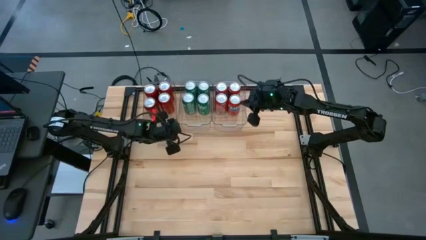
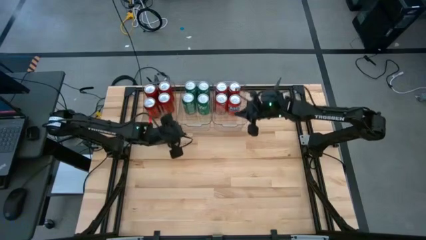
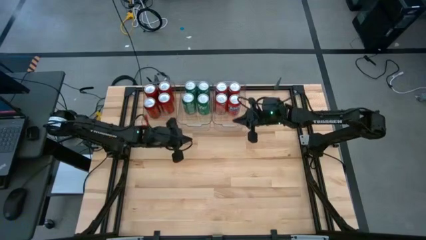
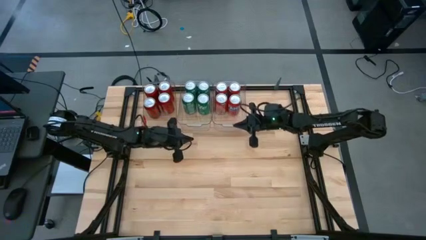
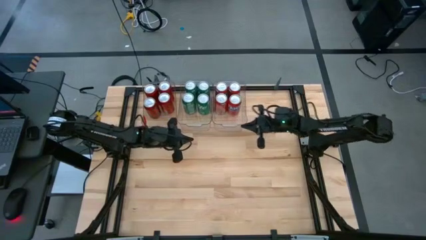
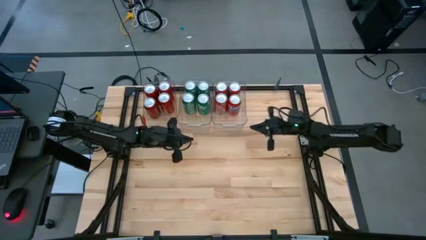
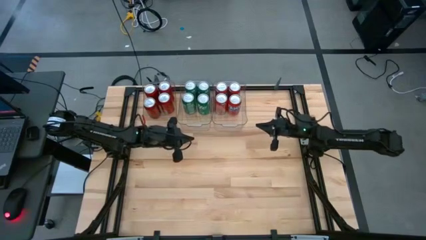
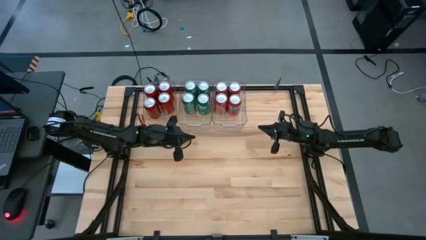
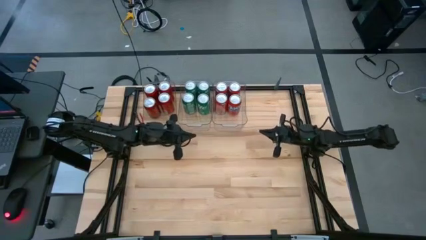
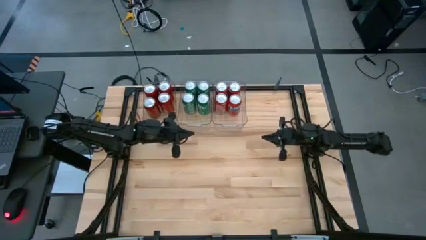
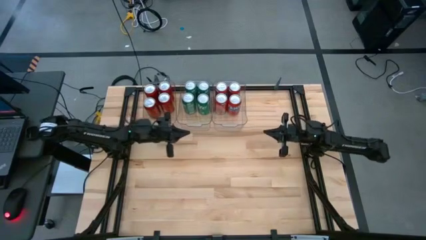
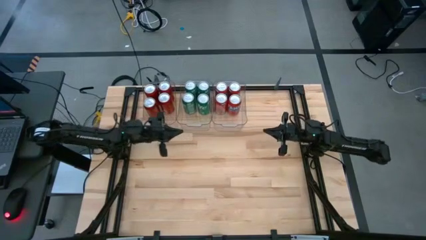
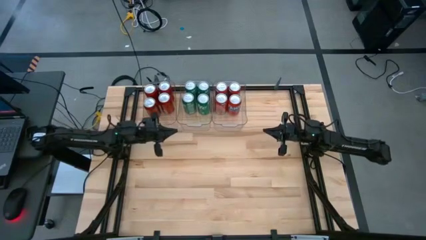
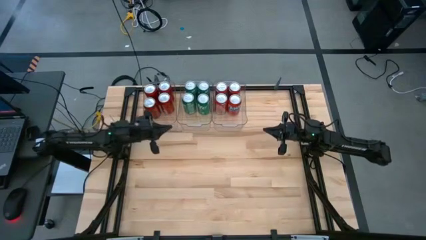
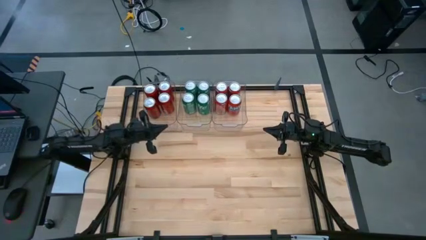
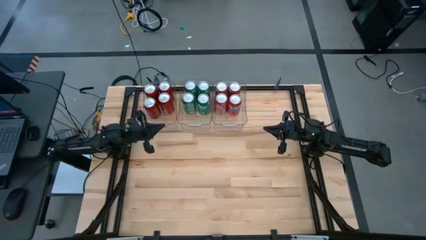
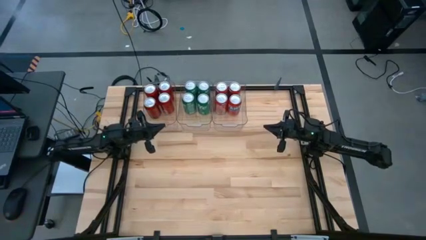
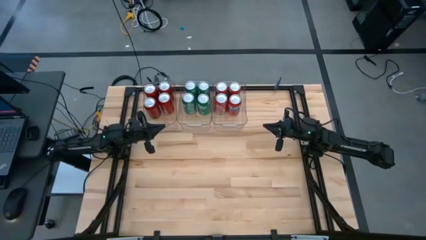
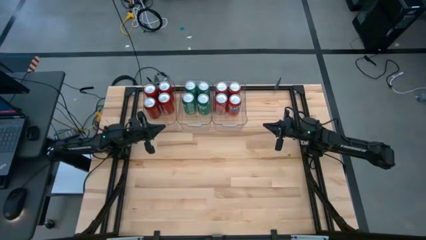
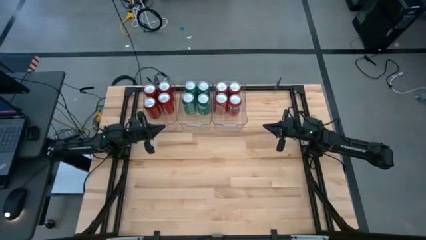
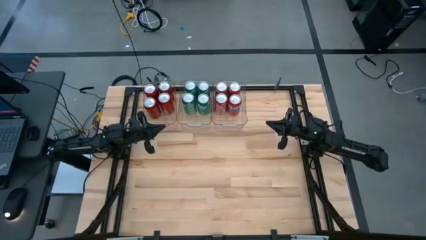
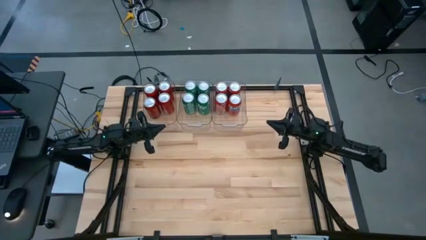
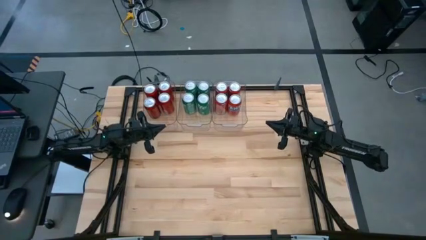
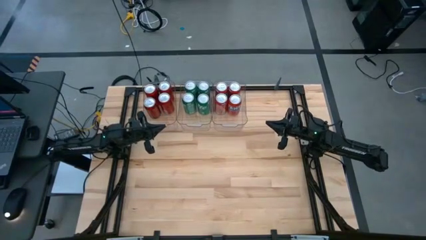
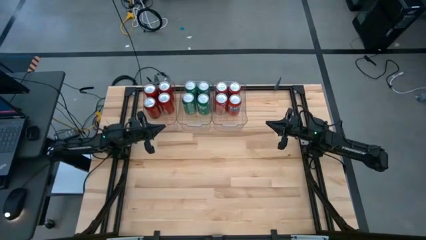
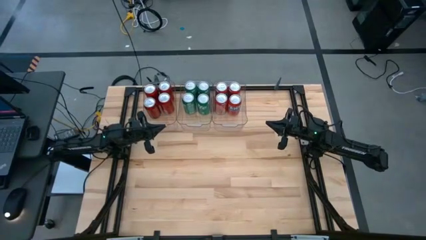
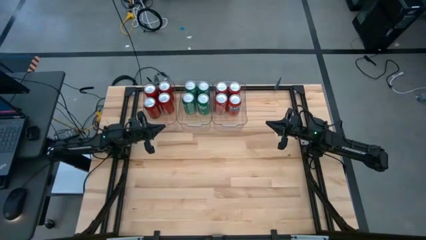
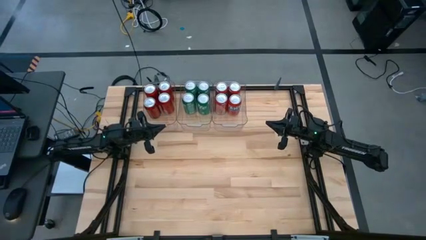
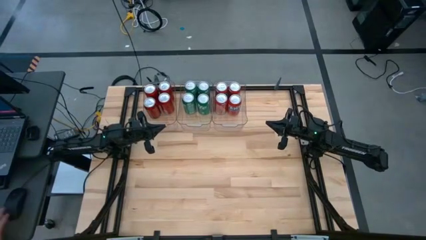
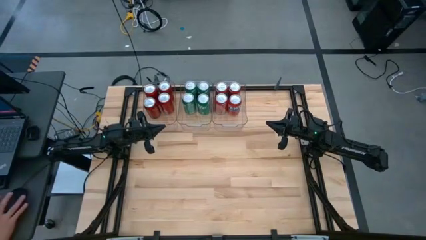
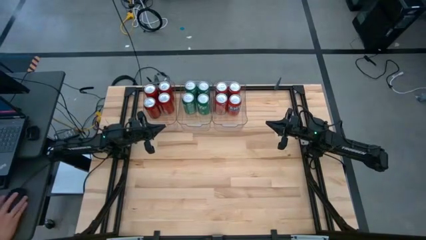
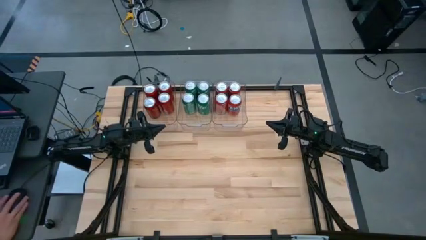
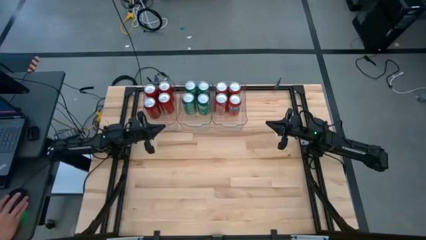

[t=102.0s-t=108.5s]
Task: Sort soda cans
Return to Home Position

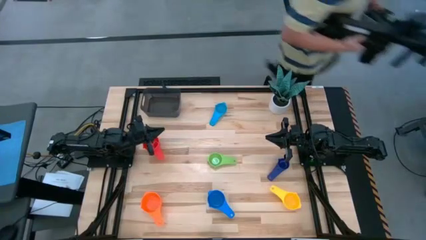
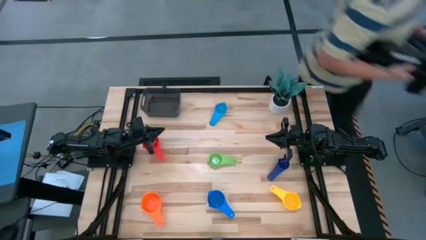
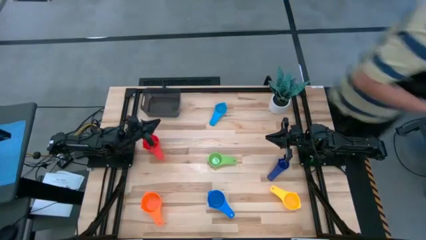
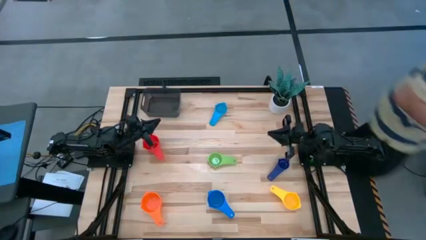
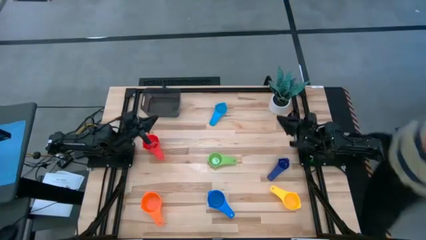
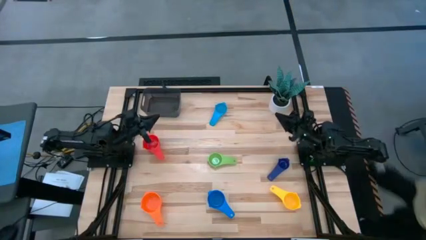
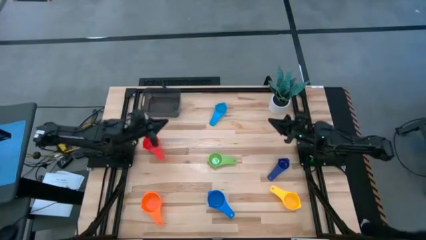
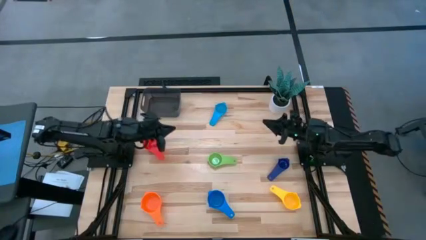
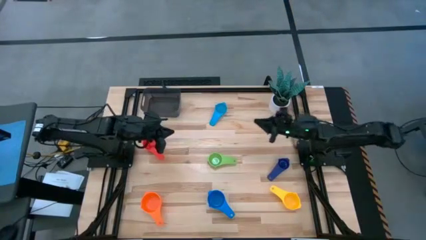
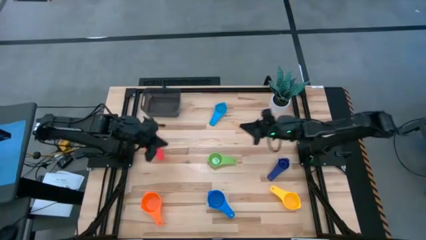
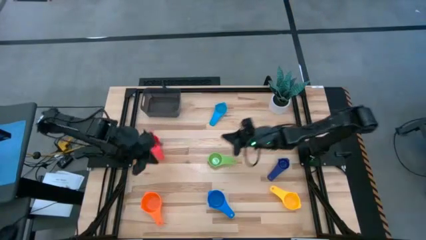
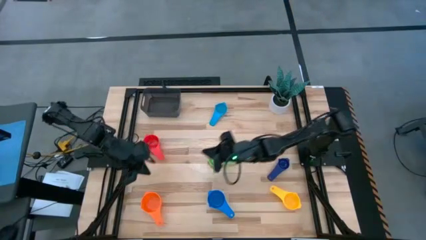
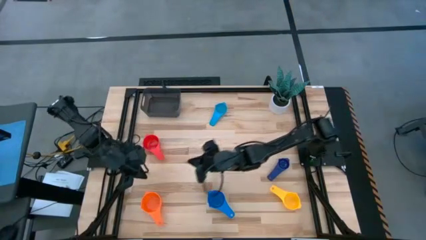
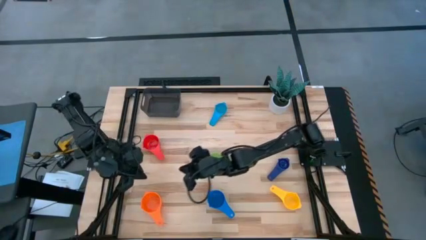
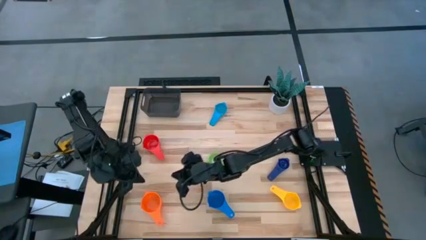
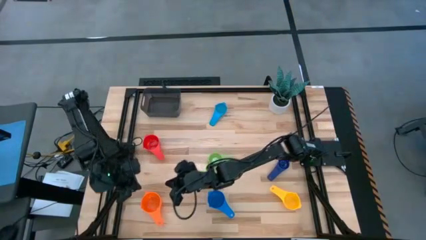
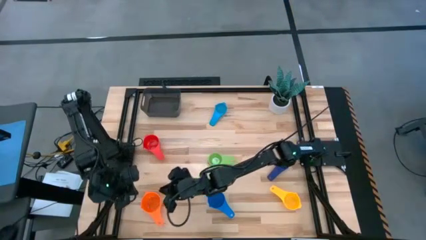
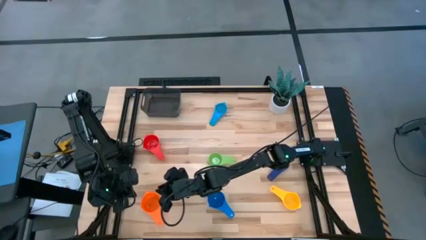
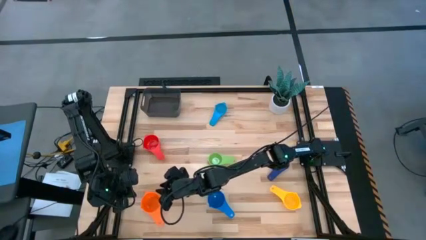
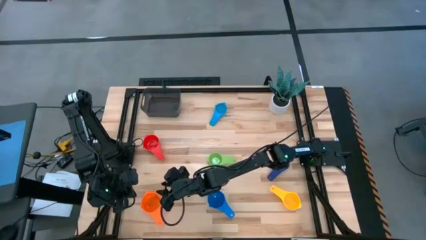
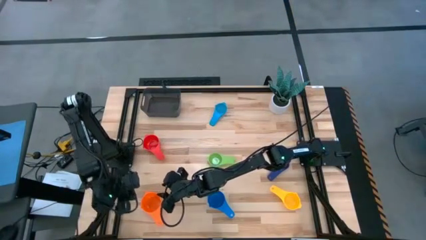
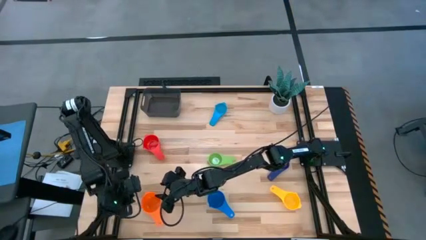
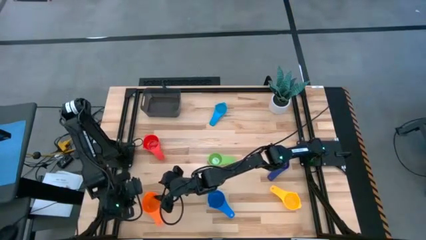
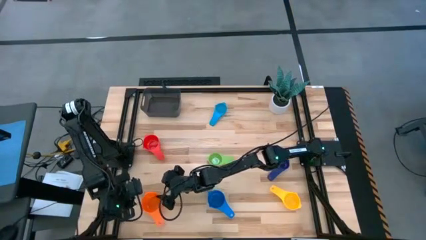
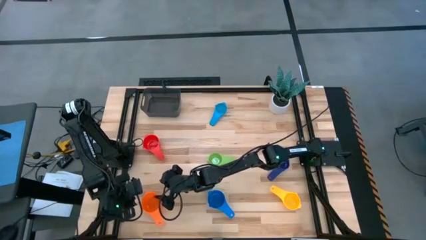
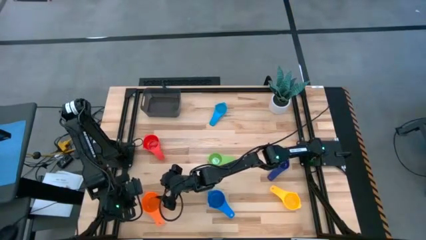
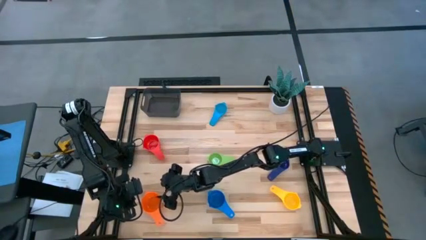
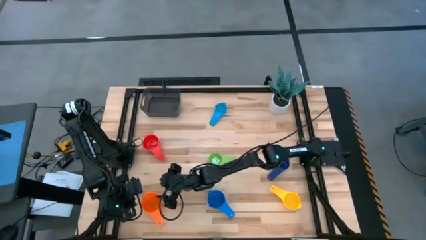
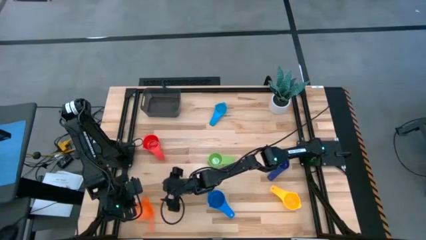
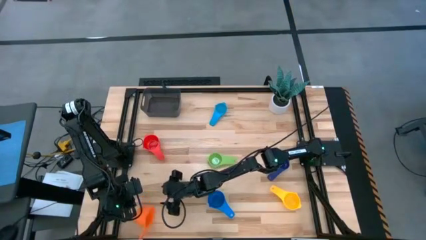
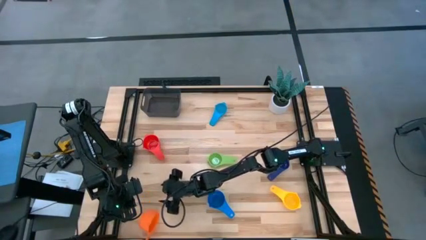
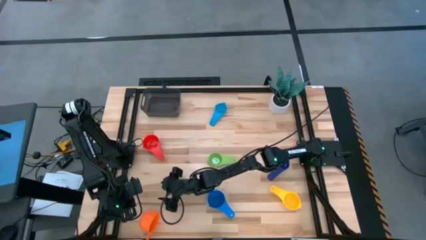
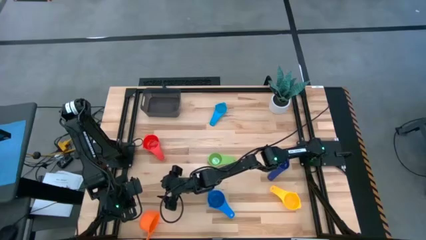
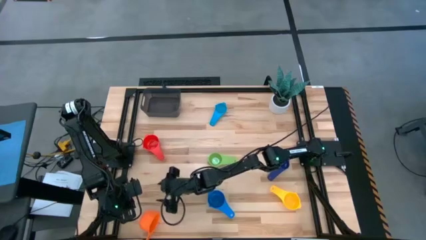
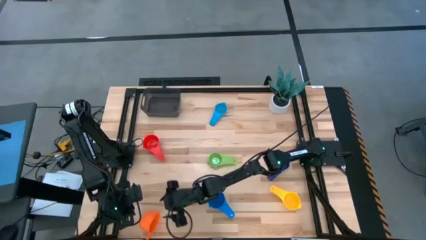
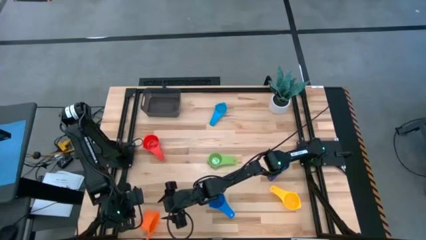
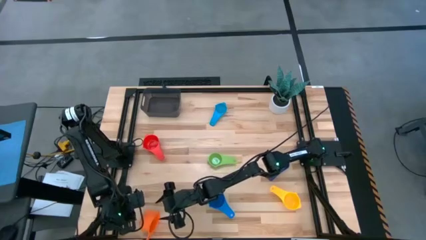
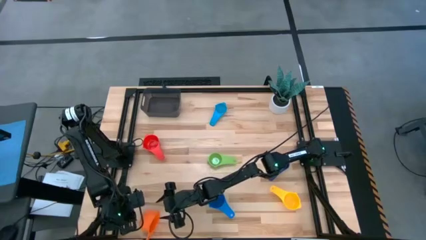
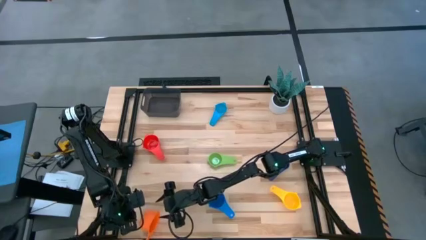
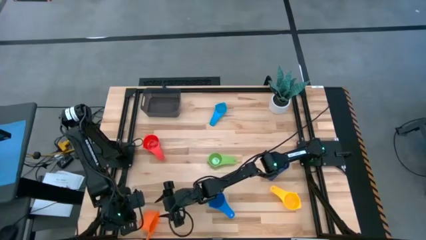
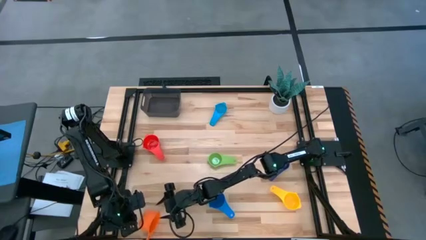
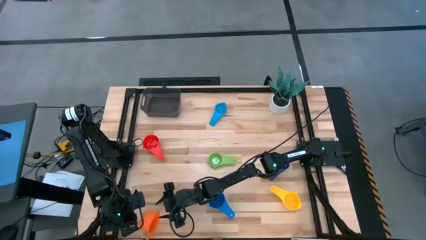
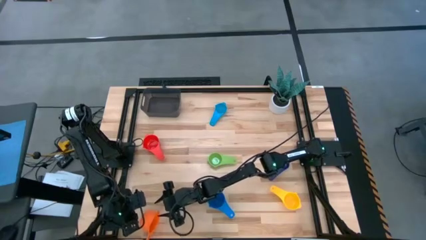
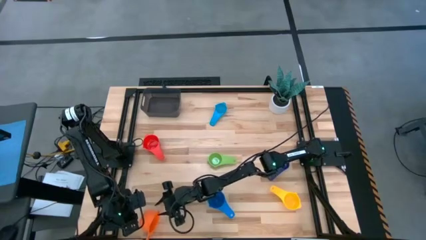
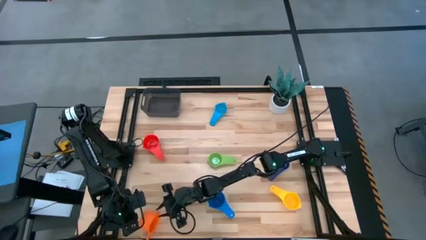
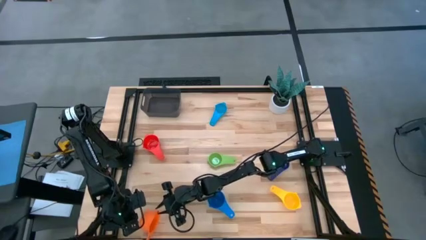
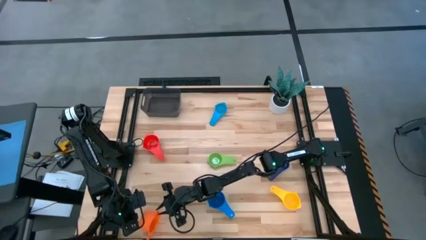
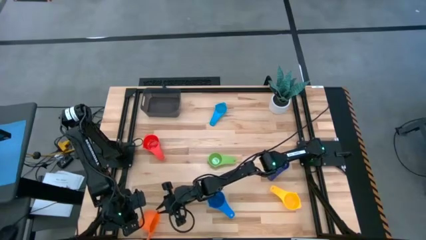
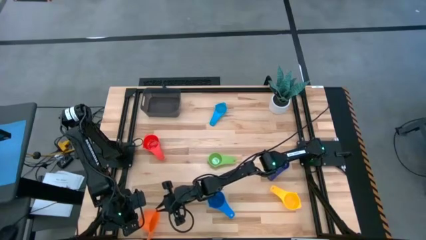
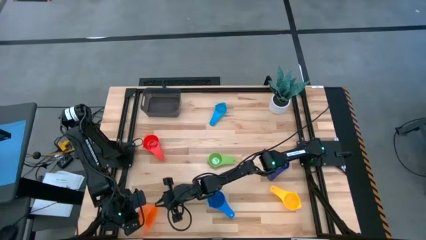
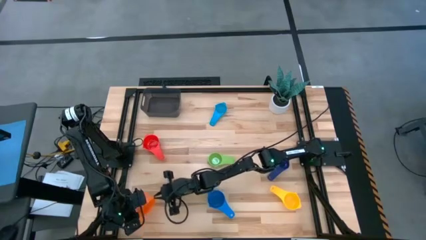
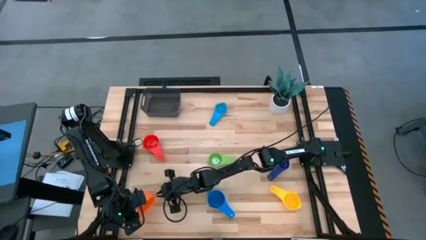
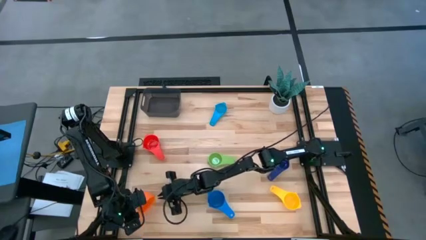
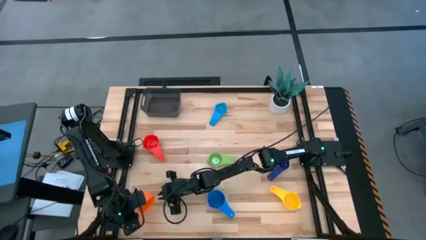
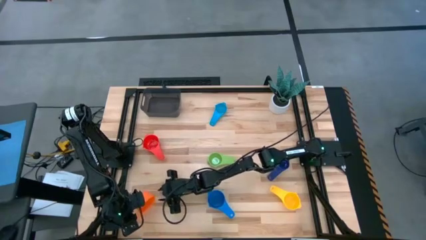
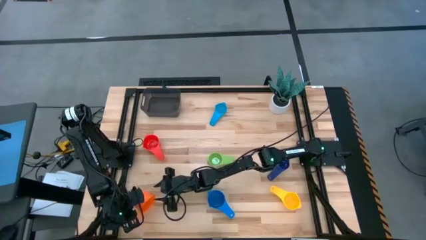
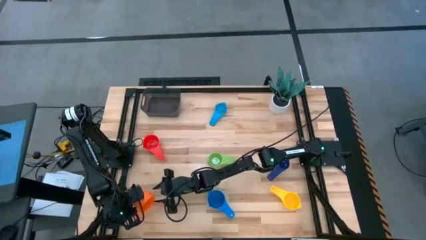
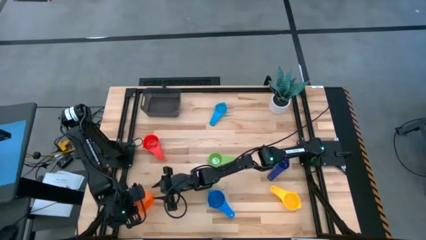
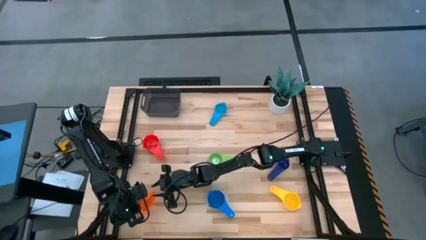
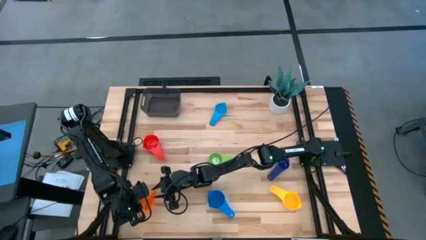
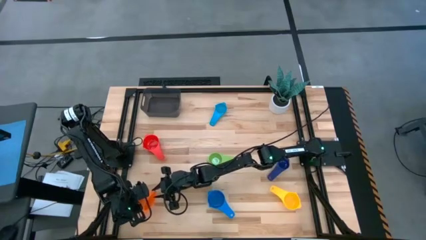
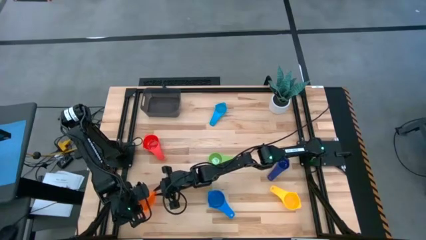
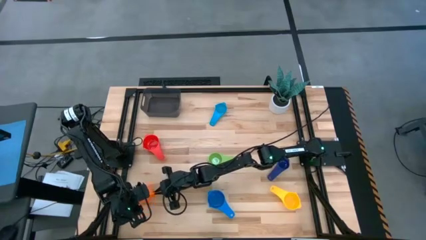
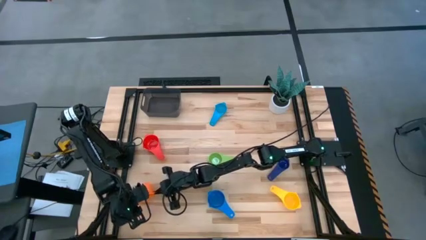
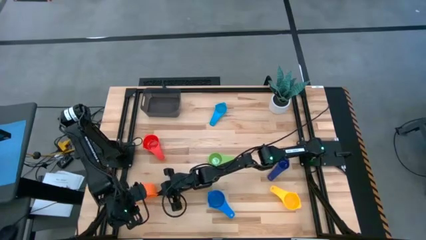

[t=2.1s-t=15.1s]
Task: Nest measuring cups in basket
Move the orange measuring cup to the center of the table
